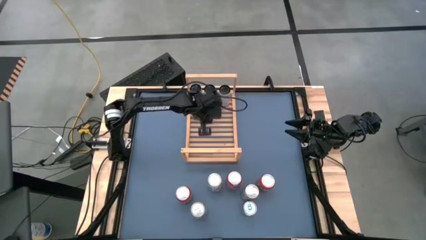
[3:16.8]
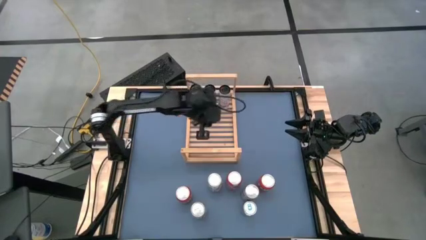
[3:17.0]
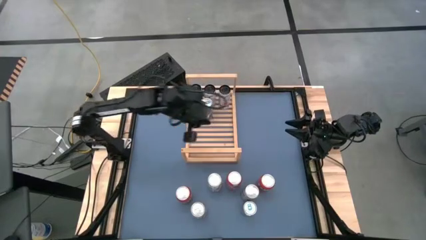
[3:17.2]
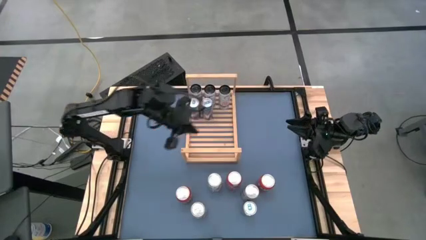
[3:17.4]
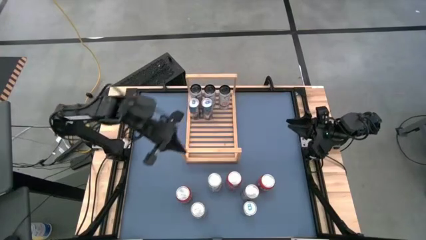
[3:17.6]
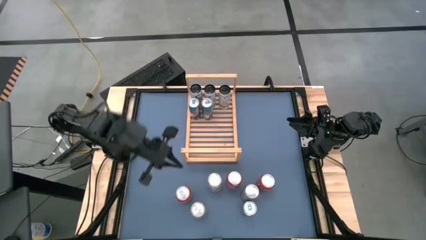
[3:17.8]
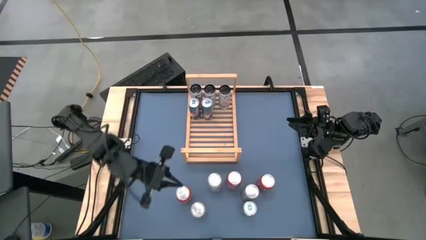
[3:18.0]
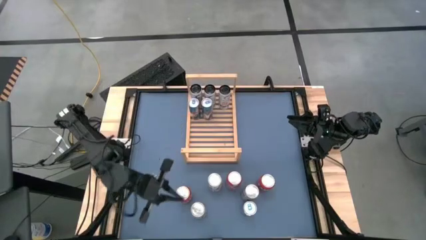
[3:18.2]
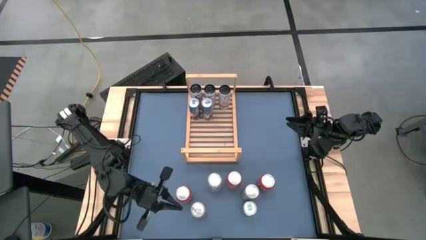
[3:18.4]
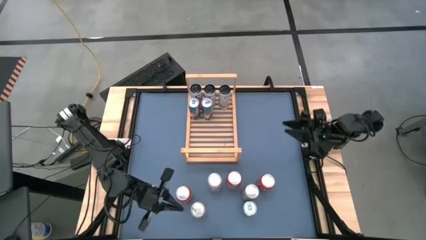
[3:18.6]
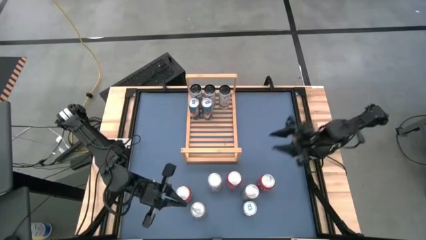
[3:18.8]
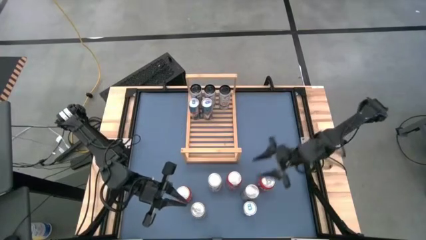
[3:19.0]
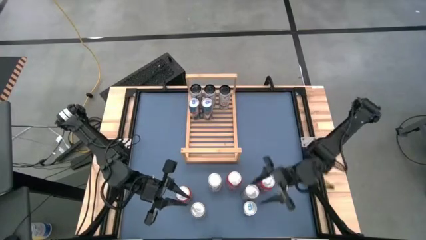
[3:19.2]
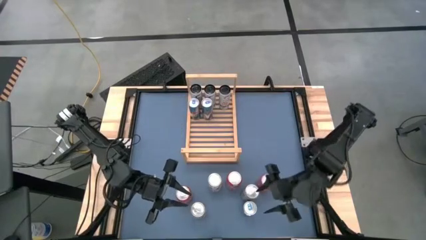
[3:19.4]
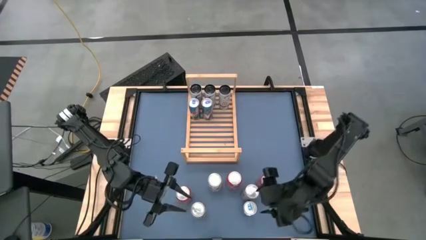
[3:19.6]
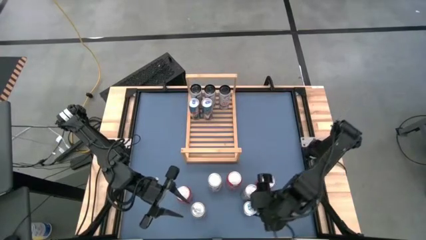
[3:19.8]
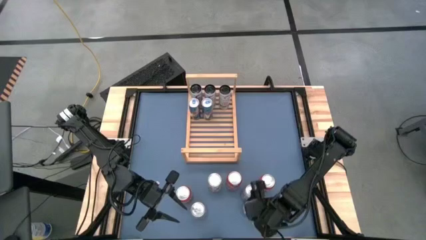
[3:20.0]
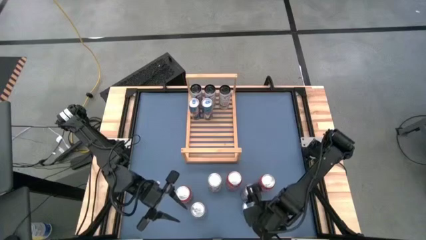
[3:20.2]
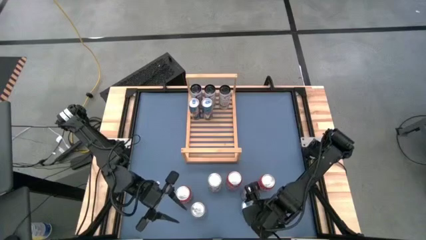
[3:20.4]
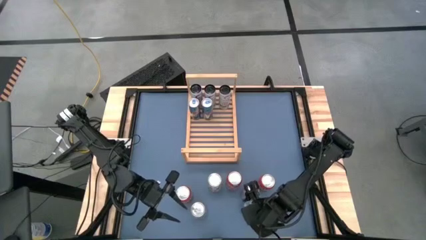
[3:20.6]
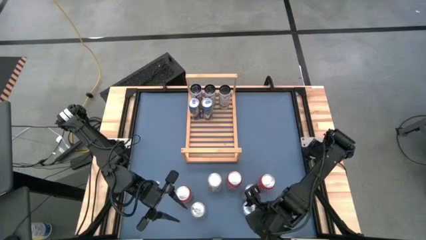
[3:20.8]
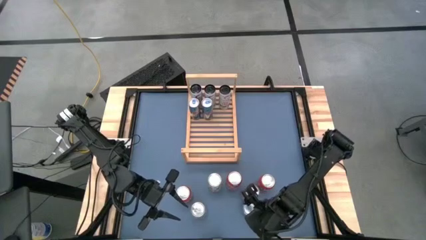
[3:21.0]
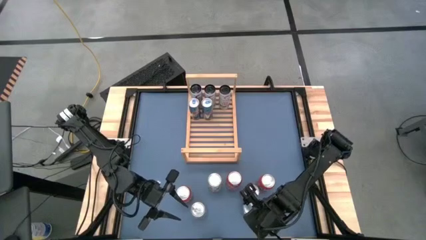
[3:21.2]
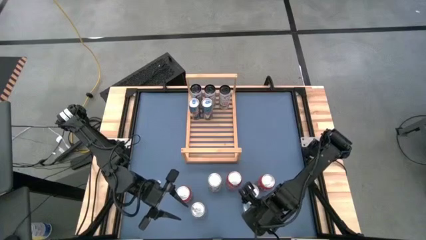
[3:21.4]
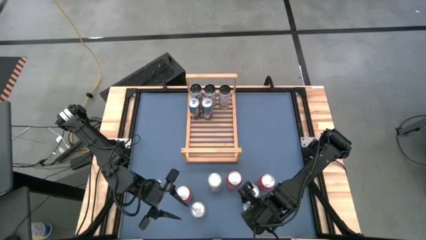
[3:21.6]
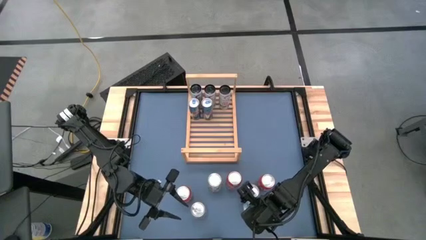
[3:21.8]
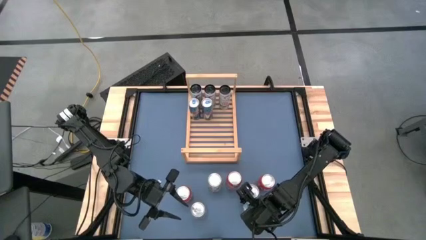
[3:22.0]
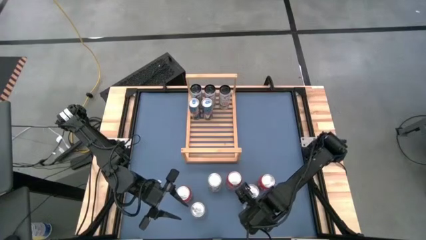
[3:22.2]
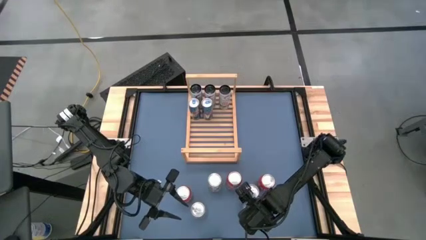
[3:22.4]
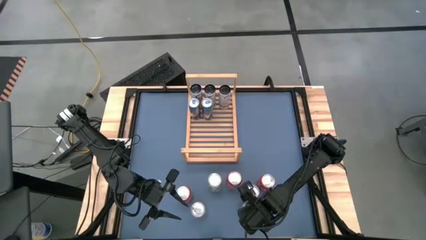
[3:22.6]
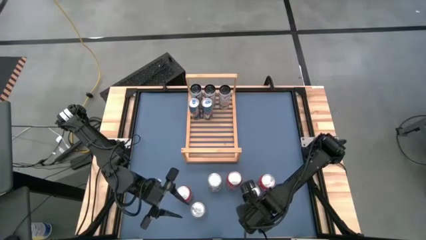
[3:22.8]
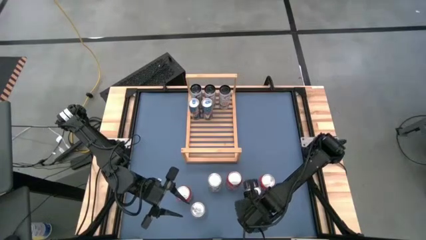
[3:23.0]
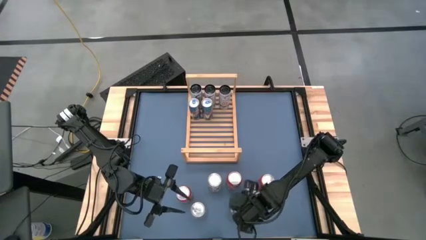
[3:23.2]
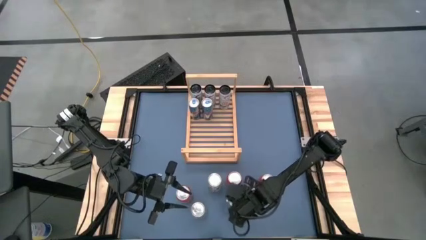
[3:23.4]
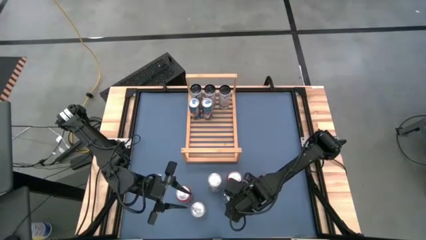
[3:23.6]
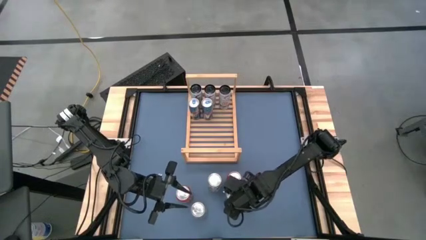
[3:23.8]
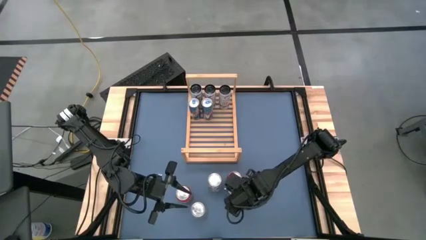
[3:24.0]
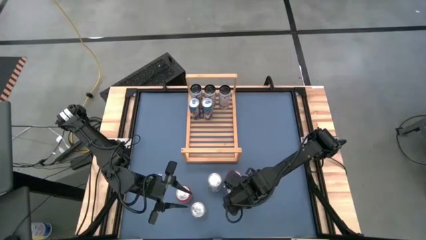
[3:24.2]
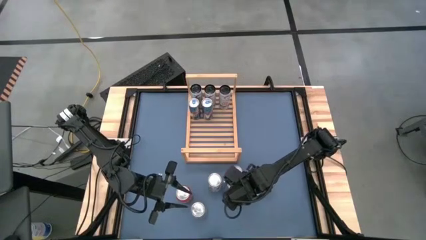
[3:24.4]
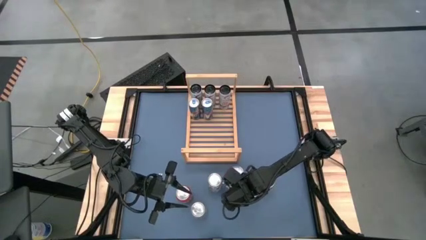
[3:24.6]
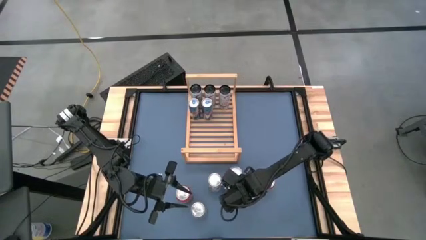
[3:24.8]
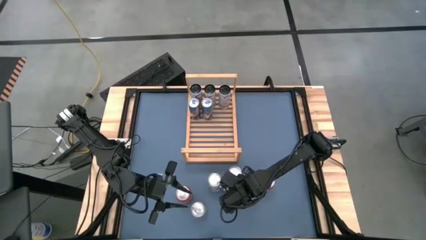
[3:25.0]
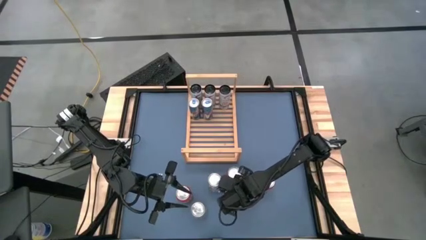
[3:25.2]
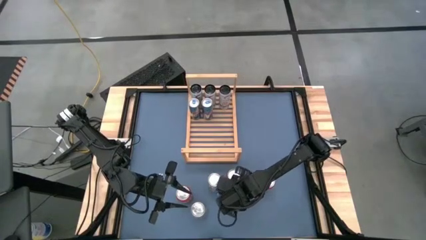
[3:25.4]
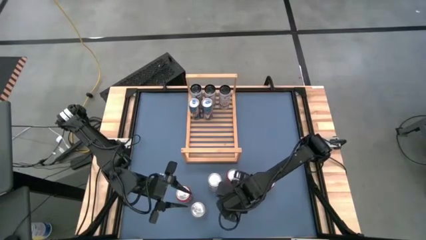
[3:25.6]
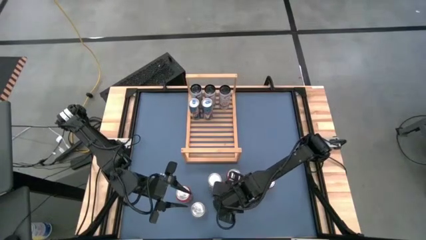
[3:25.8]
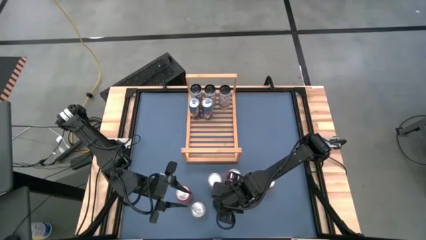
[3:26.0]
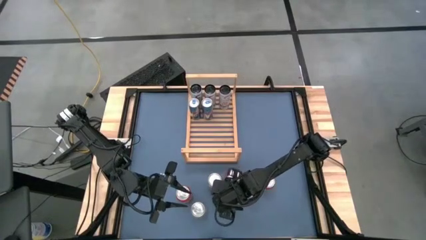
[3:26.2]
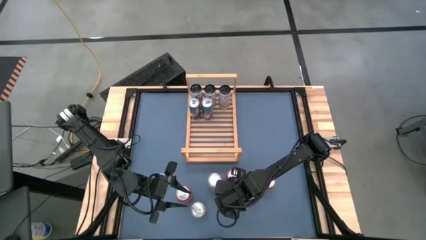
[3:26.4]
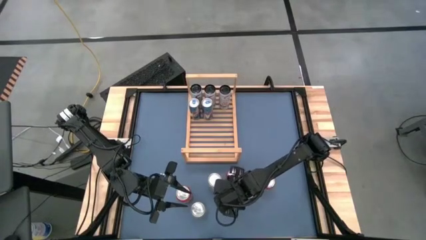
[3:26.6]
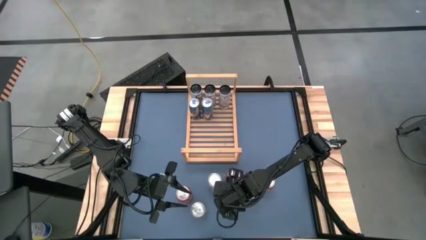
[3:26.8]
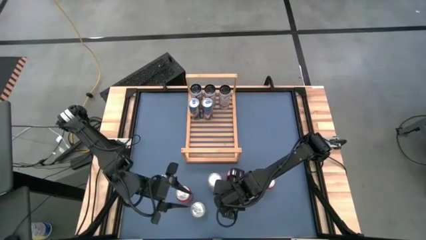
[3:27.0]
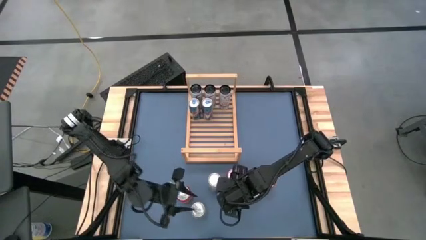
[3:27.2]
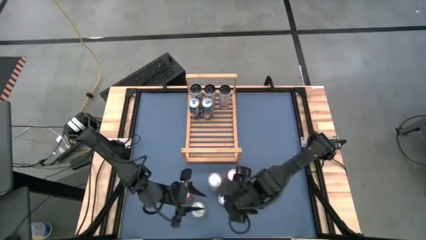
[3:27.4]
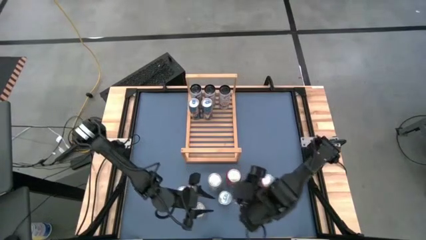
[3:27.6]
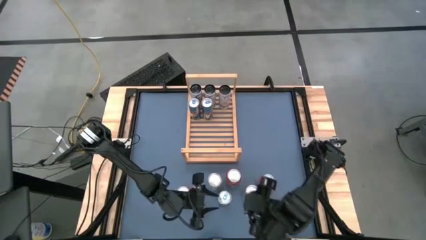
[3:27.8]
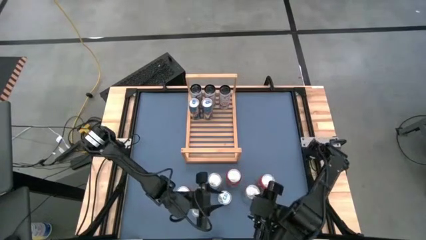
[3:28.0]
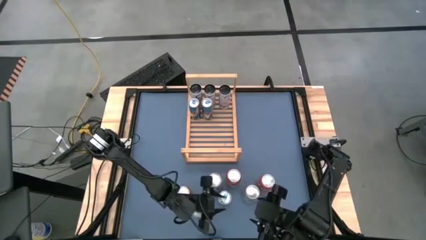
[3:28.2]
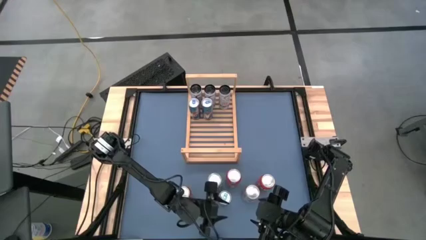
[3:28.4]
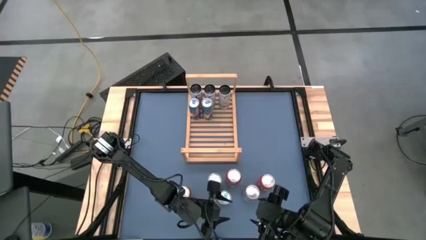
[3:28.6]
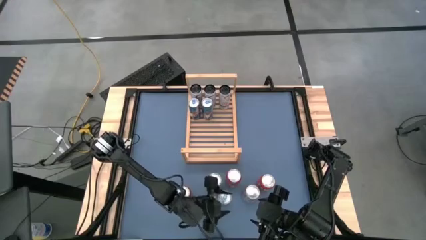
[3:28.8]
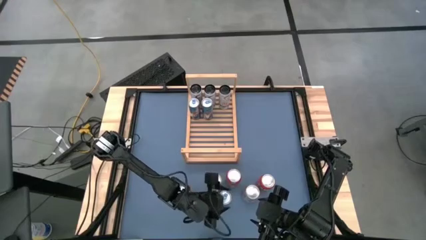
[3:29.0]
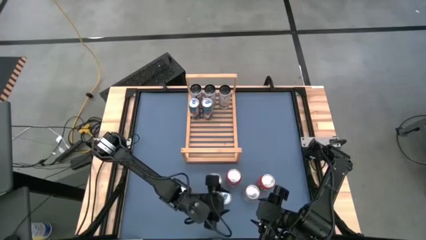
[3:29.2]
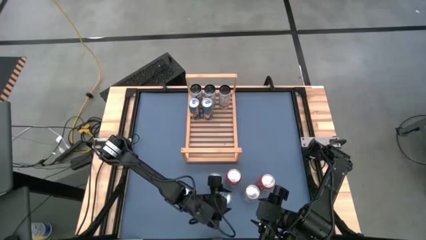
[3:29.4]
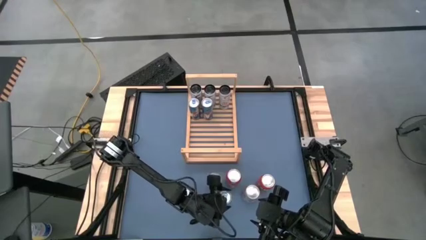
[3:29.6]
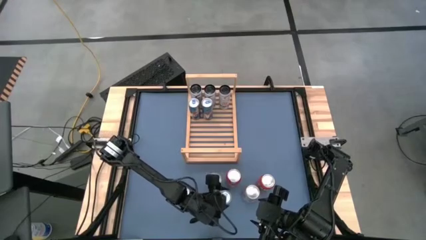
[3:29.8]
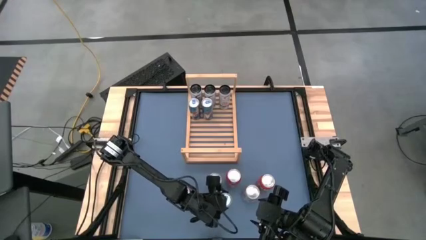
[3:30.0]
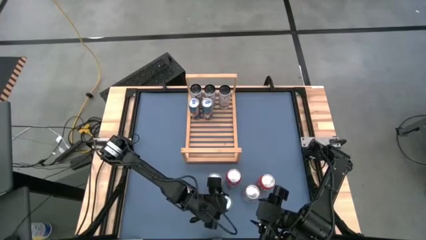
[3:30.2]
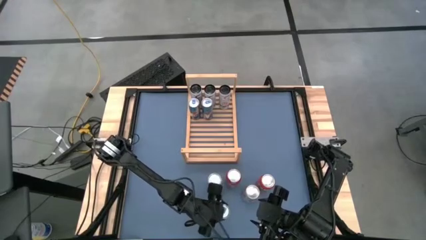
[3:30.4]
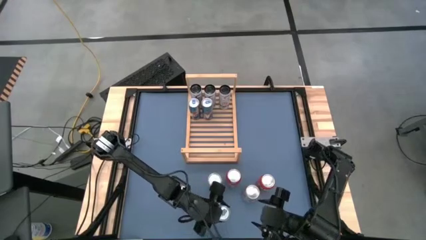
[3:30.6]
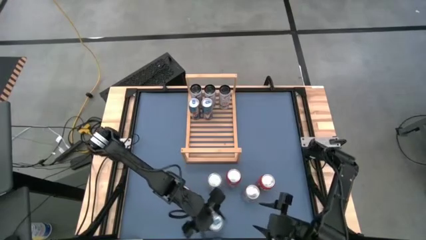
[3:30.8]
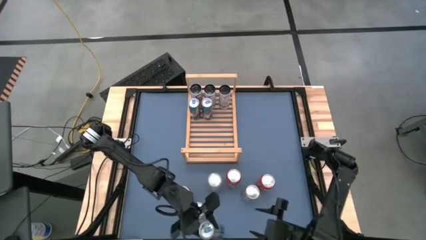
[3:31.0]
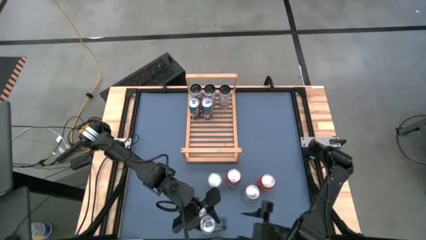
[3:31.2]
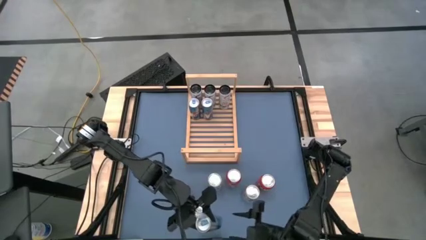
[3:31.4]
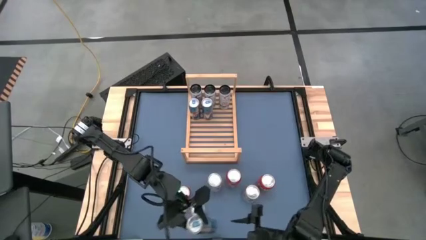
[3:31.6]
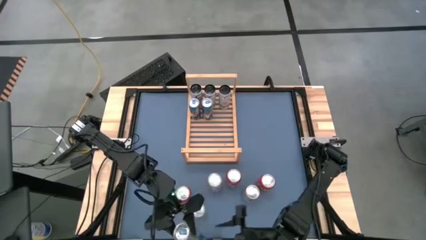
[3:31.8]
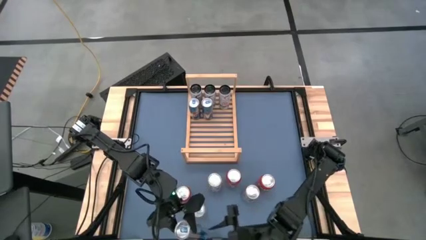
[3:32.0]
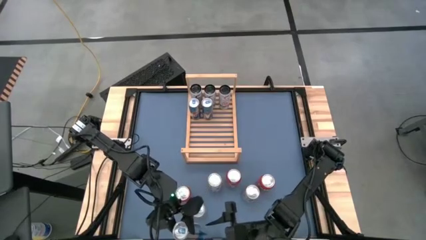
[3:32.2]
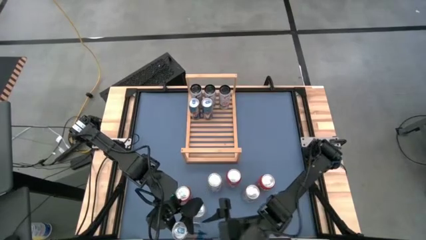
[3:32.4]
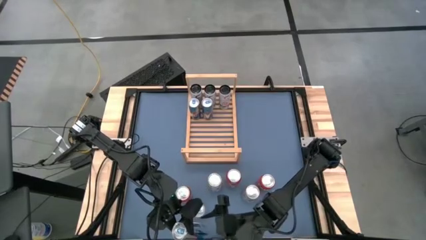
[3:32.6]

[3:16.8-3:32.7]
Task: Place canned beverage on shelf
Put the blue soda can on the shelf aligned with the other blue soda cans
